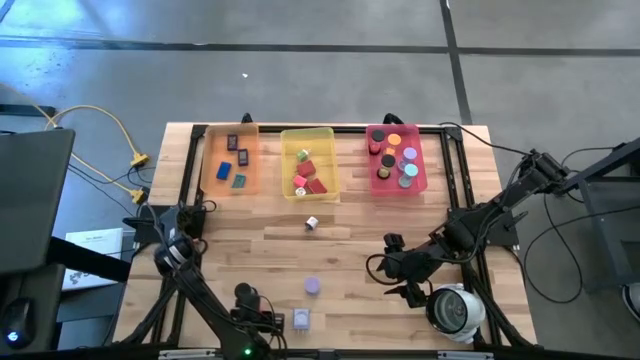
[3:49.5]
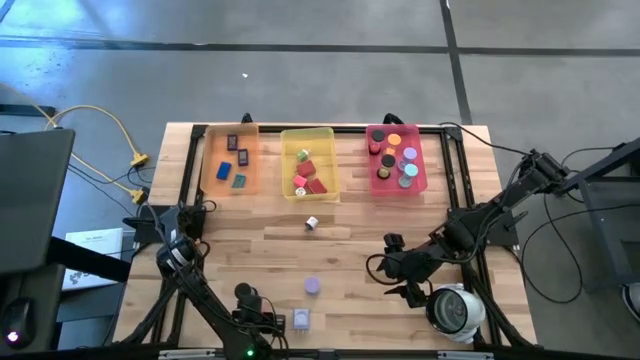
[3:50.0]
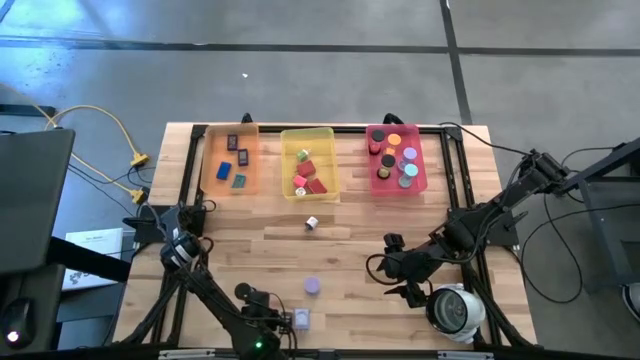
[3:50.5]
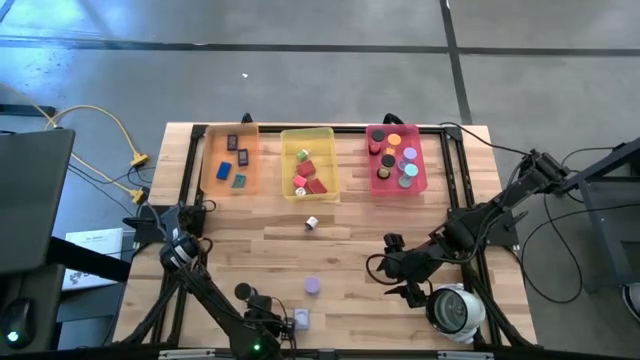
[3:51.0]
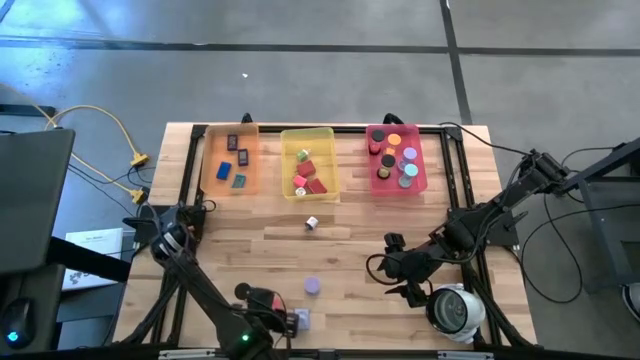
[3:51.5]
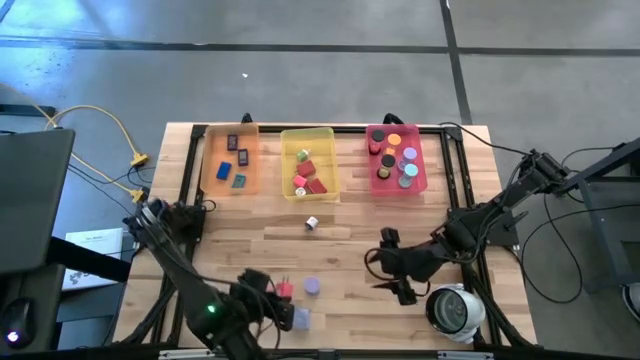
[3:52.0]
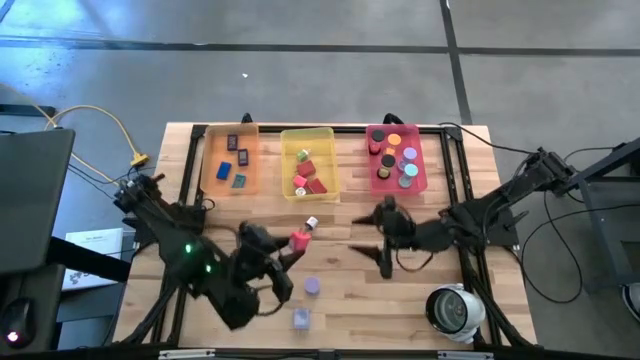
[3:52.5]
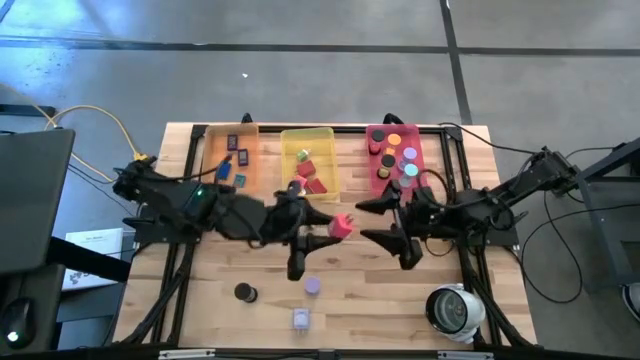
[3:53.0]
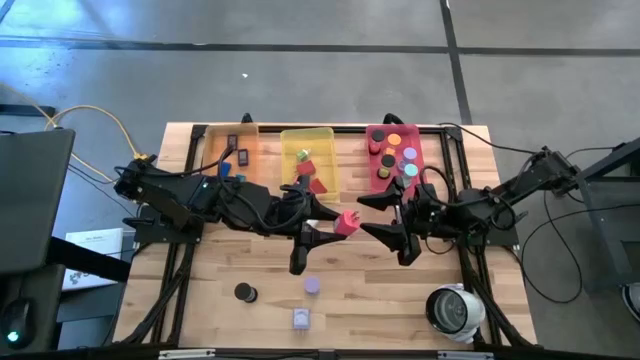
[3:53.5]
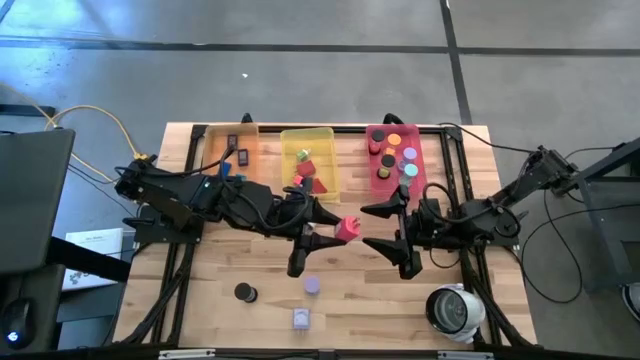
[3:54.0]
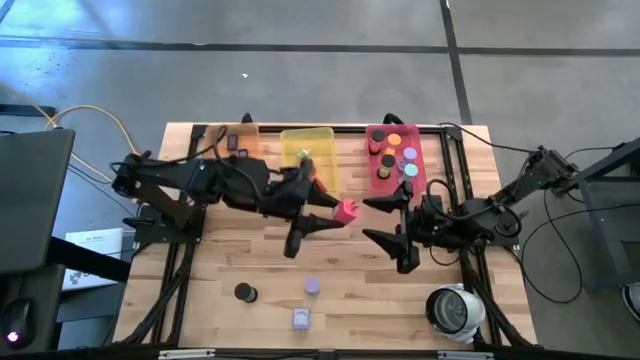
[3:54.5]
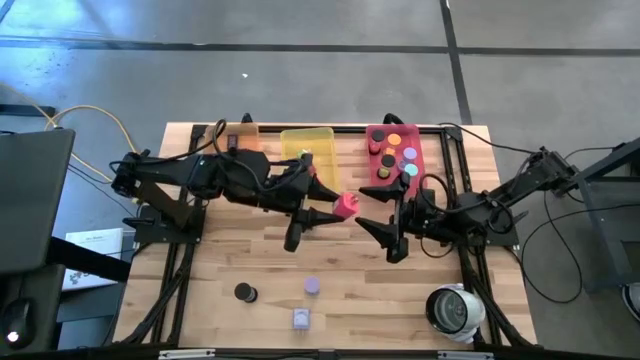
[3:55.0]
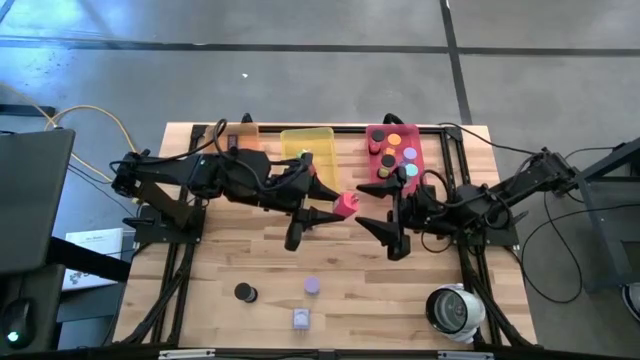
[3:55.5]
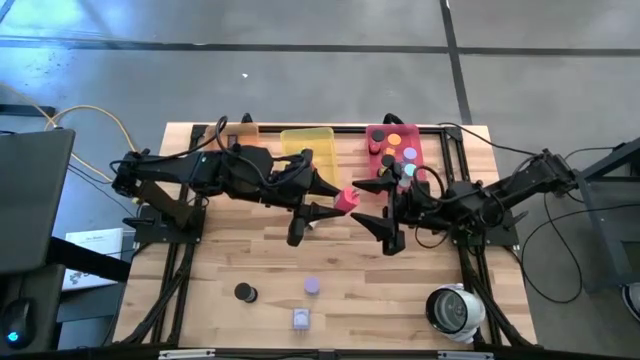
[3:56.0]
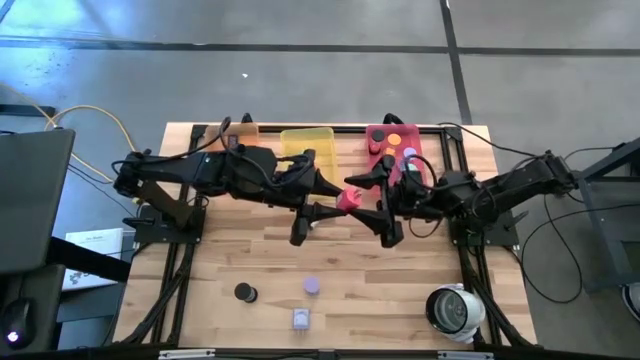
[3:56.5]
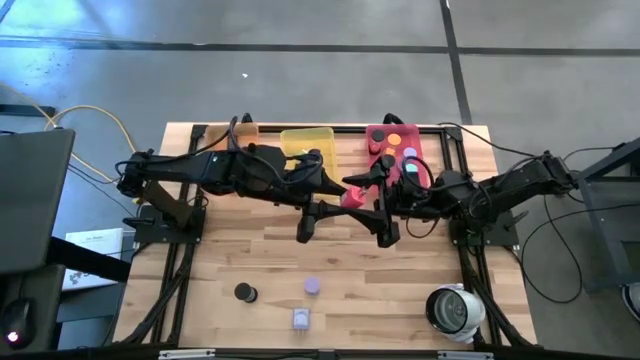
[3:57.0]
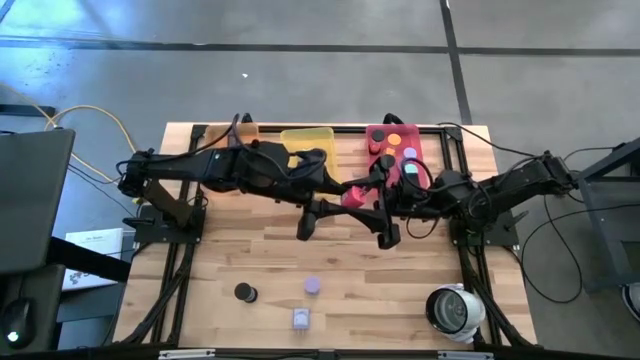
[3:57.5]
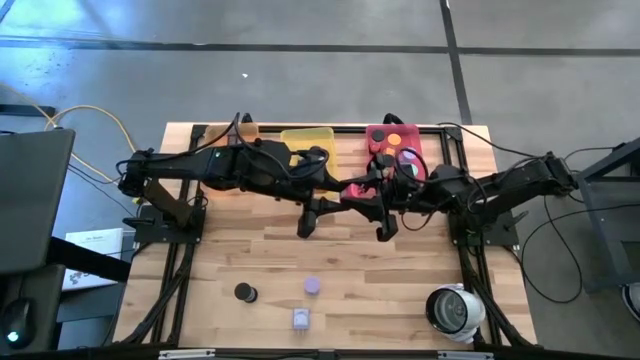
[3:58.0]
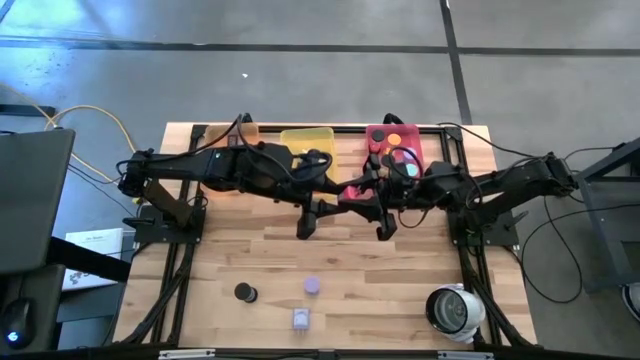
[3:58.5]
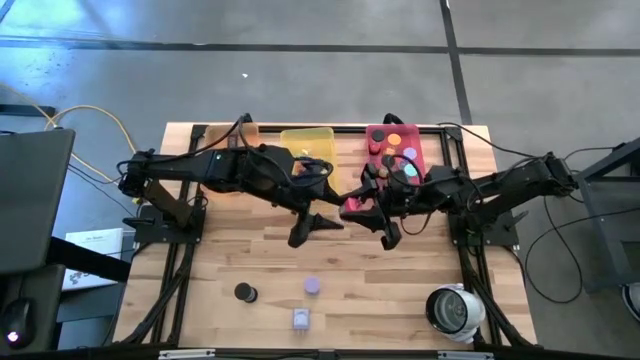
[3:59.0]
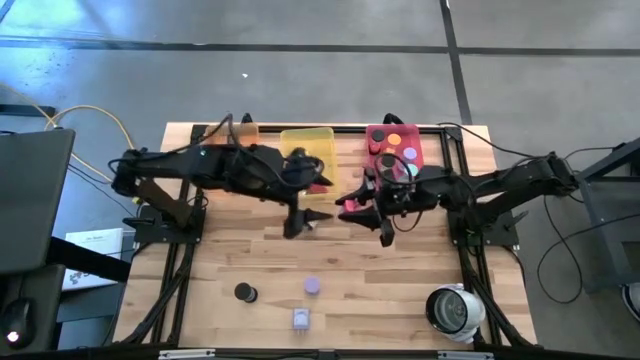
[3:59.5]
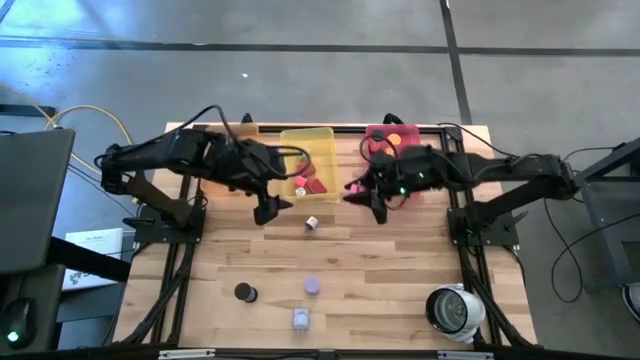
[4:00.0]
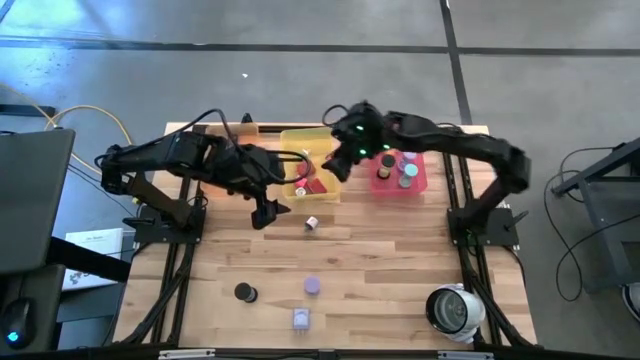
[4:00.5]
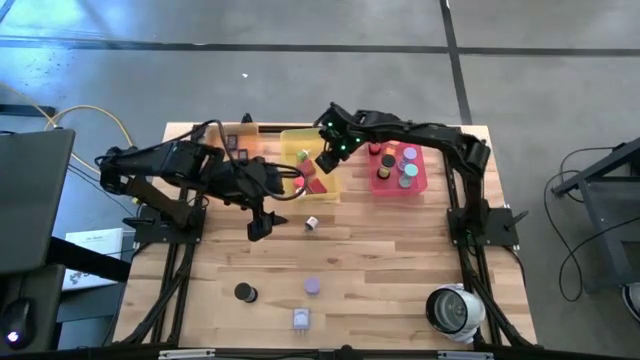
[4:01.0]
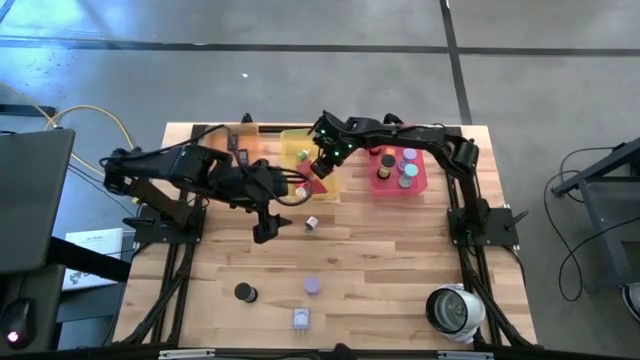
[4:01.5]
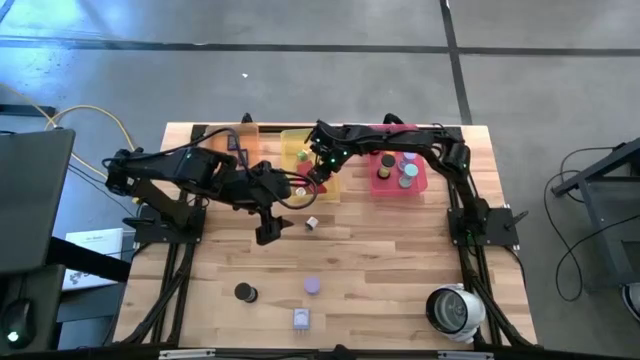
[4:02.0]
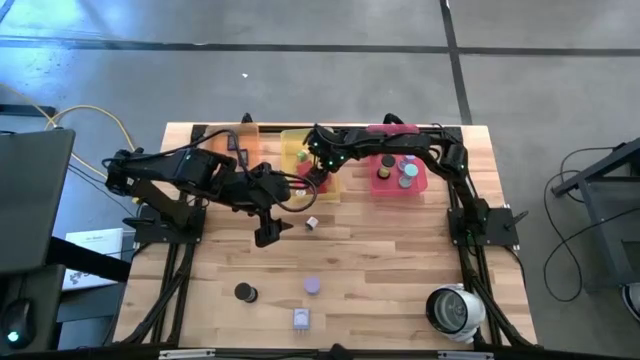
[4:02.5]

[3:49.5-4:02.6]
Task: Pick & Place Office items
Put the pink charger adapter into the yellow bin
